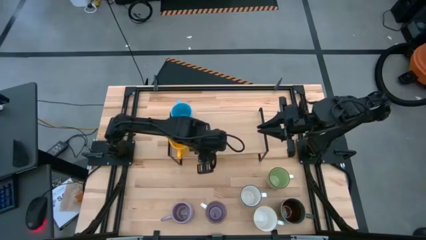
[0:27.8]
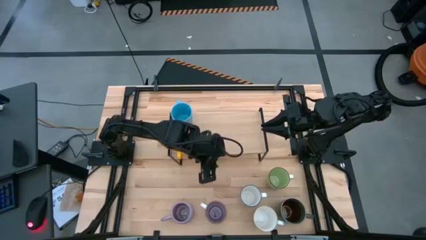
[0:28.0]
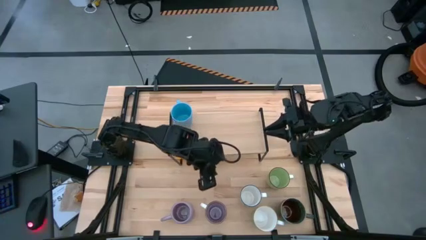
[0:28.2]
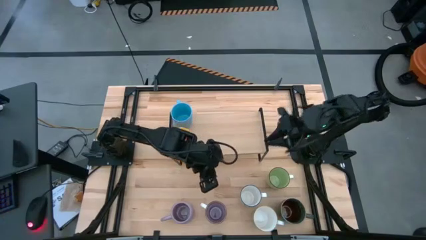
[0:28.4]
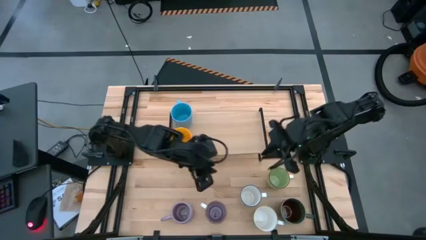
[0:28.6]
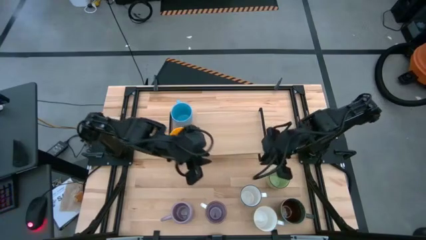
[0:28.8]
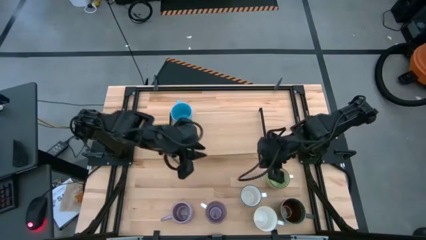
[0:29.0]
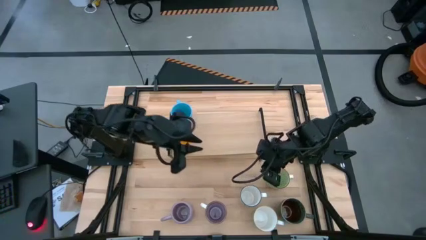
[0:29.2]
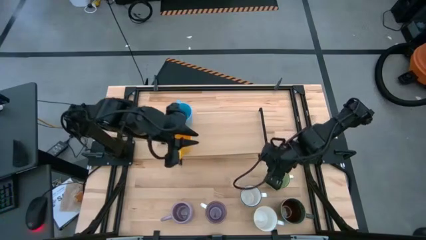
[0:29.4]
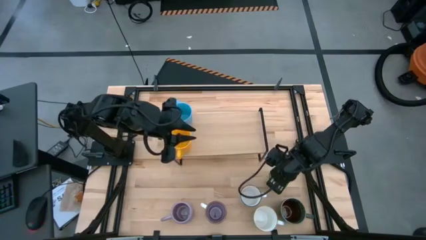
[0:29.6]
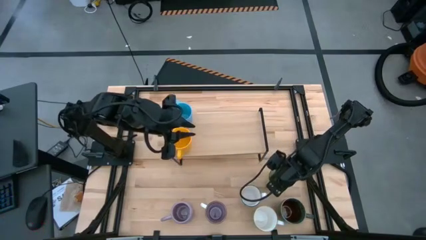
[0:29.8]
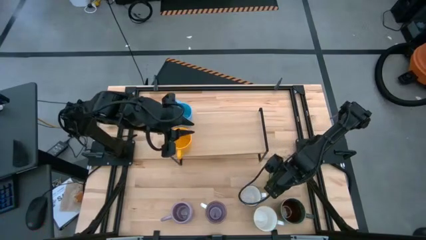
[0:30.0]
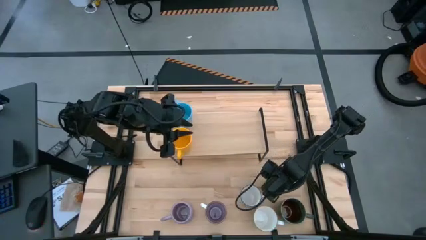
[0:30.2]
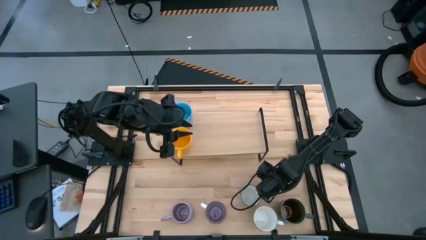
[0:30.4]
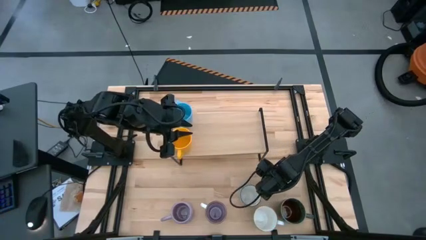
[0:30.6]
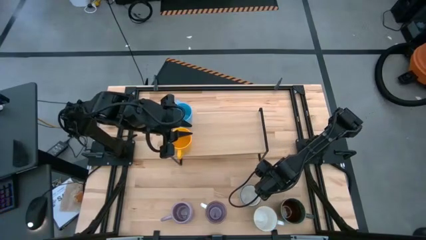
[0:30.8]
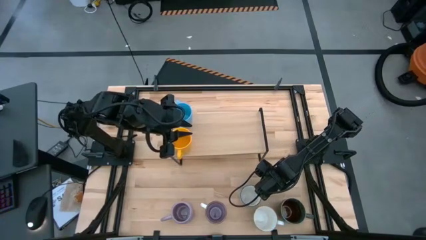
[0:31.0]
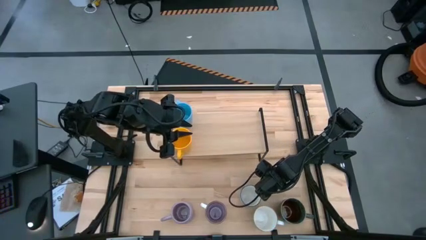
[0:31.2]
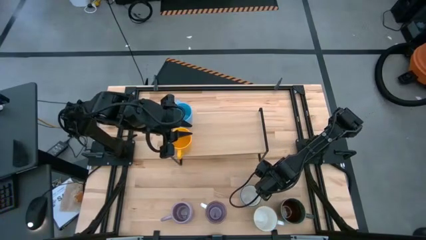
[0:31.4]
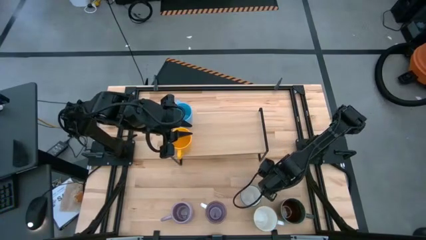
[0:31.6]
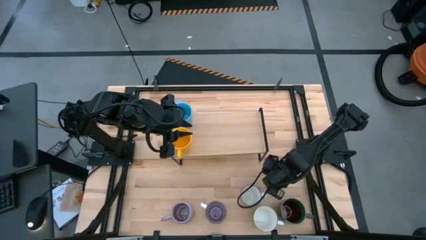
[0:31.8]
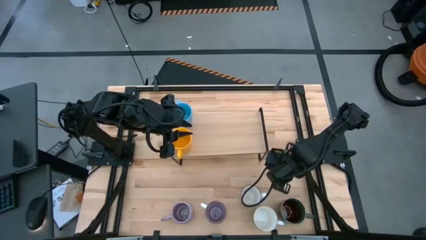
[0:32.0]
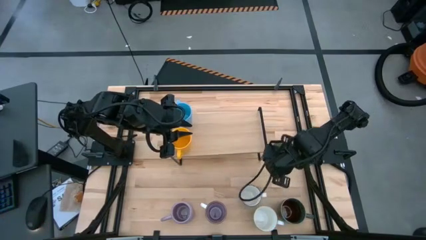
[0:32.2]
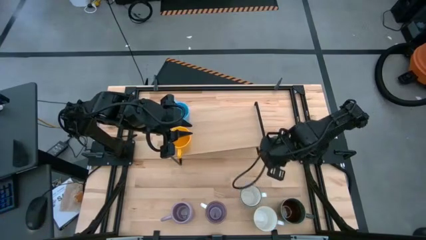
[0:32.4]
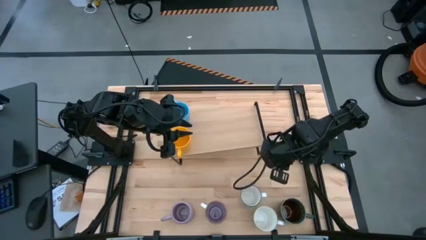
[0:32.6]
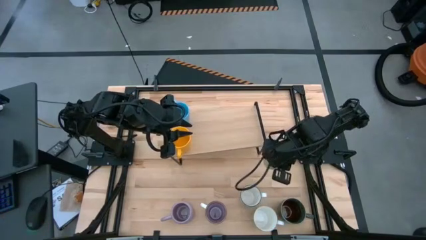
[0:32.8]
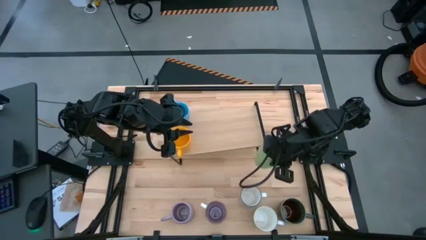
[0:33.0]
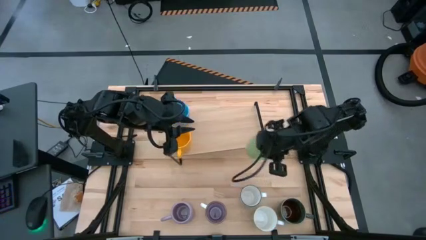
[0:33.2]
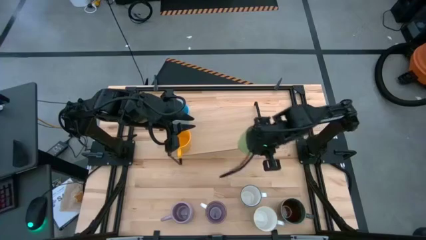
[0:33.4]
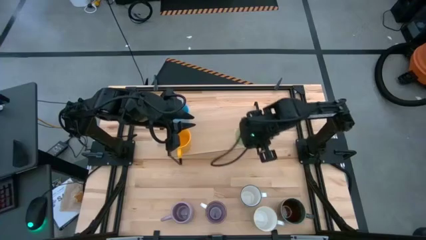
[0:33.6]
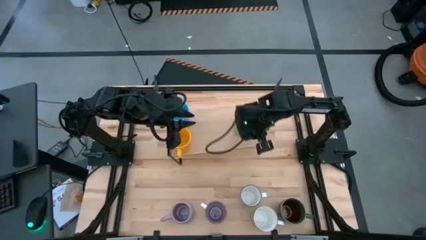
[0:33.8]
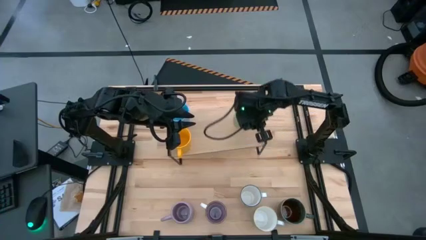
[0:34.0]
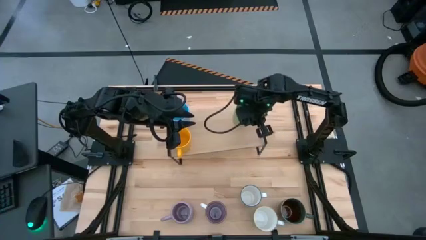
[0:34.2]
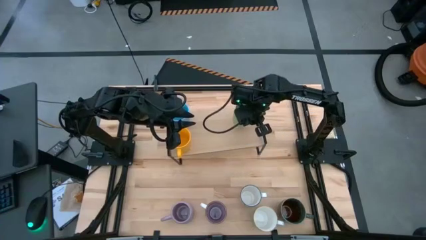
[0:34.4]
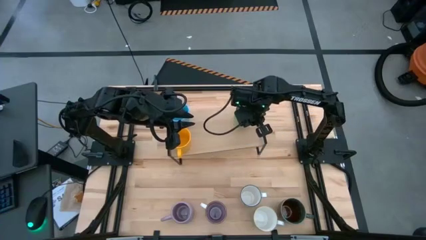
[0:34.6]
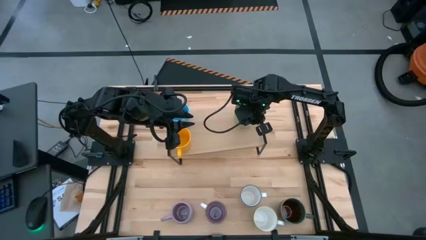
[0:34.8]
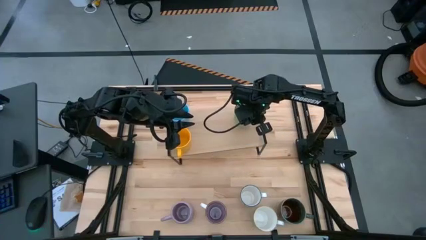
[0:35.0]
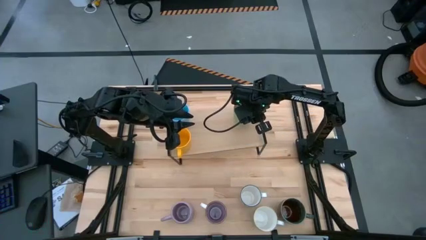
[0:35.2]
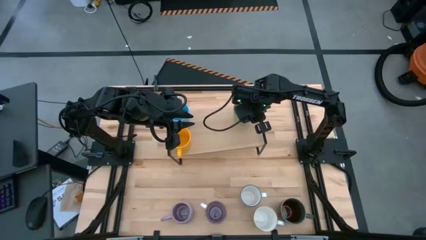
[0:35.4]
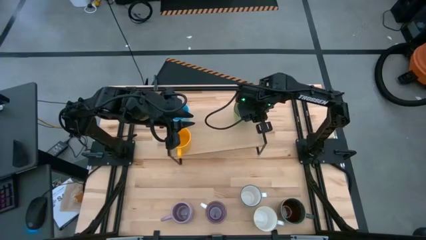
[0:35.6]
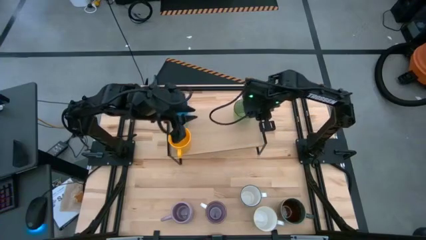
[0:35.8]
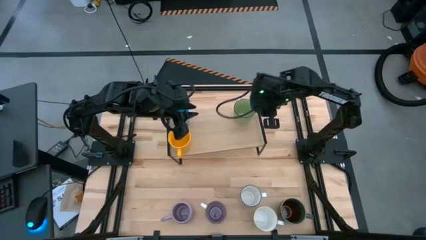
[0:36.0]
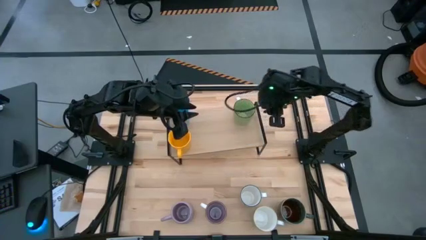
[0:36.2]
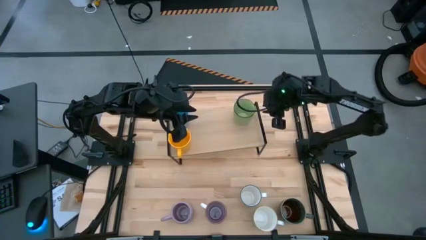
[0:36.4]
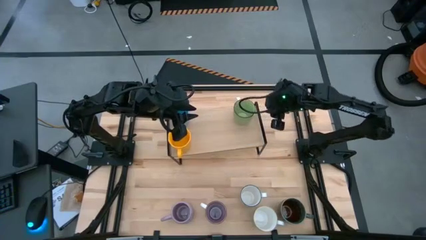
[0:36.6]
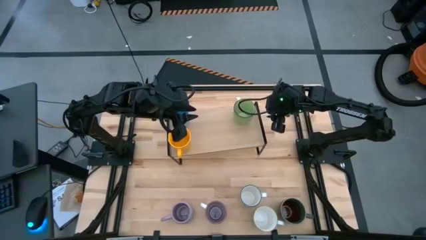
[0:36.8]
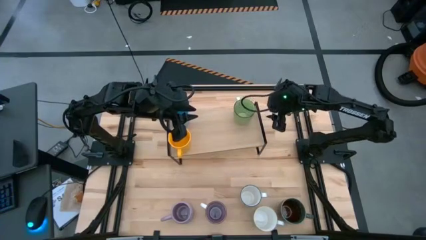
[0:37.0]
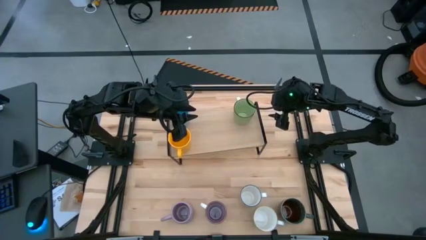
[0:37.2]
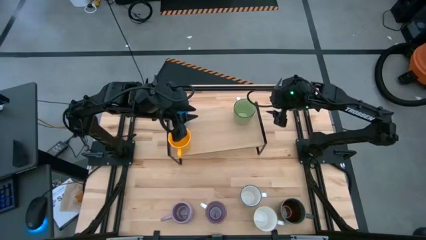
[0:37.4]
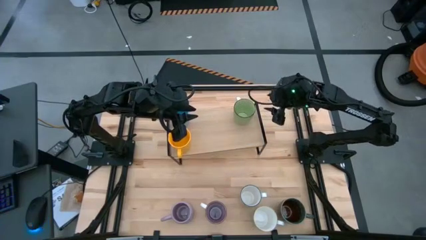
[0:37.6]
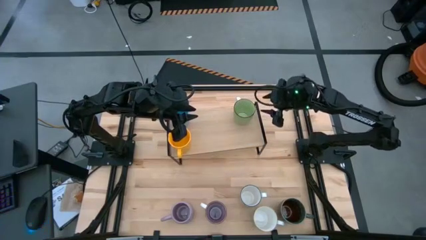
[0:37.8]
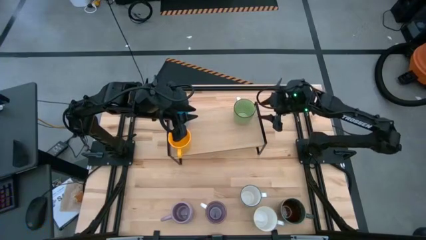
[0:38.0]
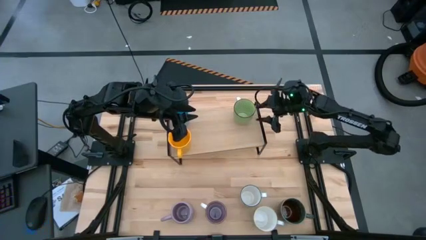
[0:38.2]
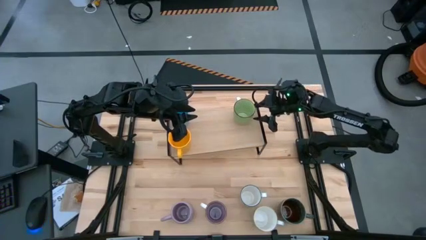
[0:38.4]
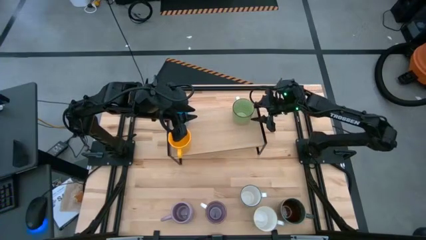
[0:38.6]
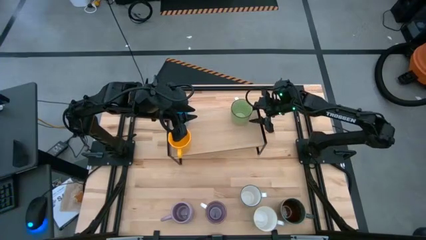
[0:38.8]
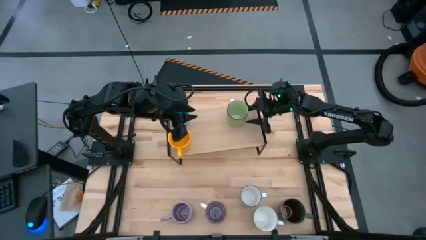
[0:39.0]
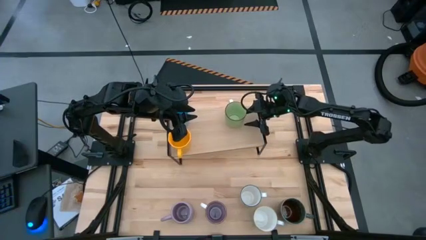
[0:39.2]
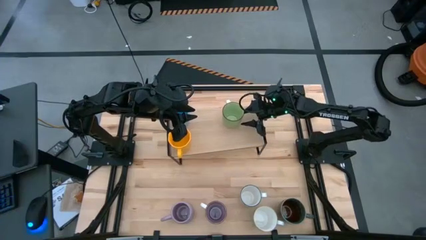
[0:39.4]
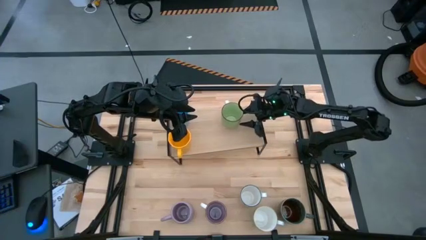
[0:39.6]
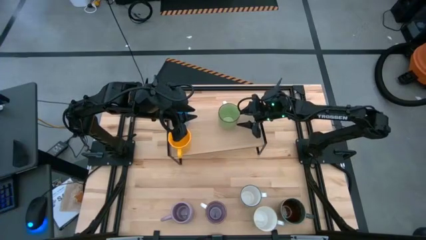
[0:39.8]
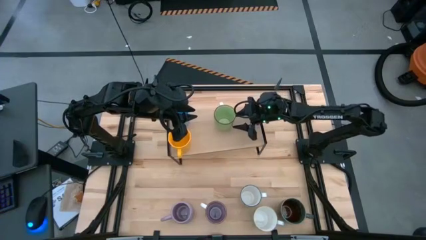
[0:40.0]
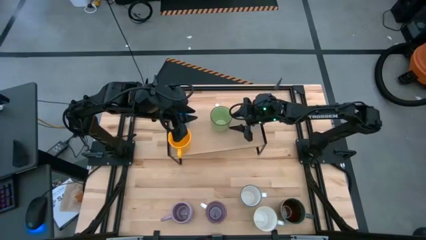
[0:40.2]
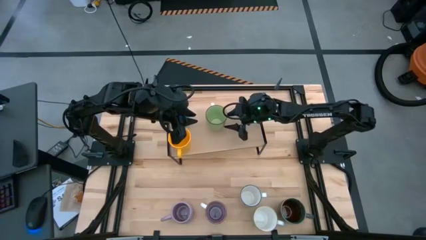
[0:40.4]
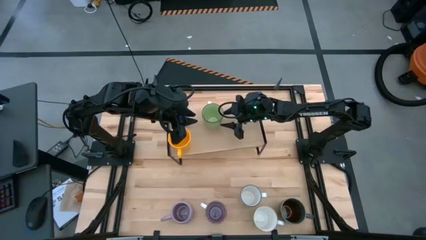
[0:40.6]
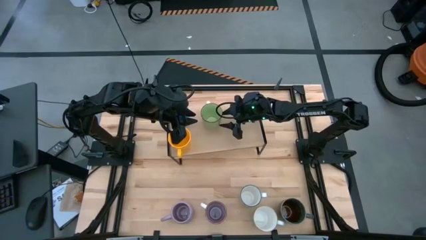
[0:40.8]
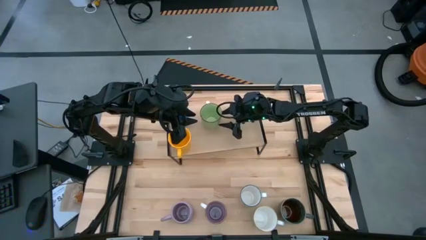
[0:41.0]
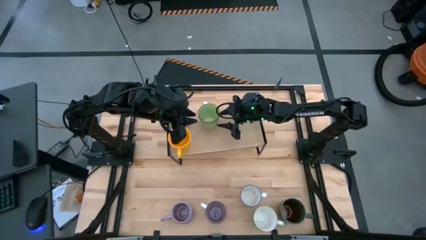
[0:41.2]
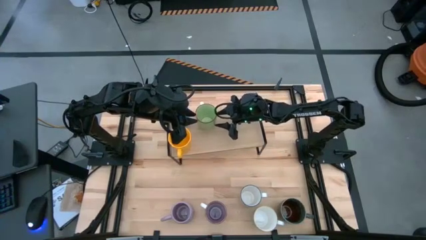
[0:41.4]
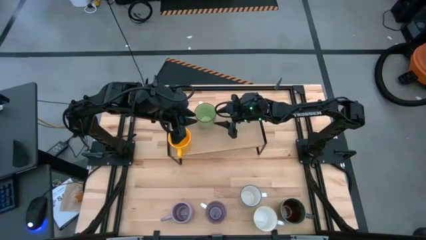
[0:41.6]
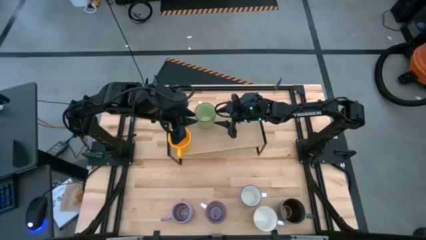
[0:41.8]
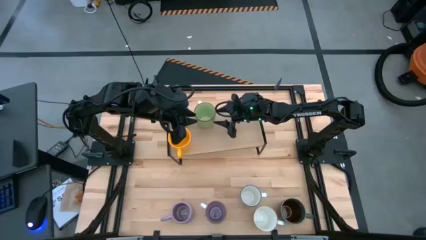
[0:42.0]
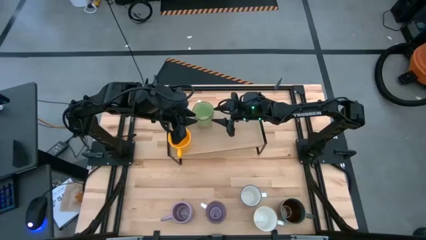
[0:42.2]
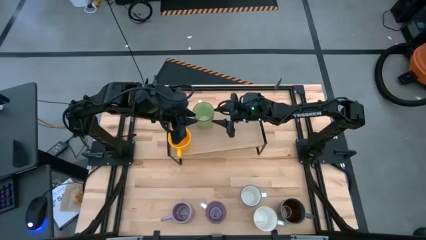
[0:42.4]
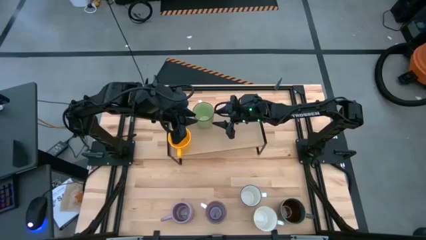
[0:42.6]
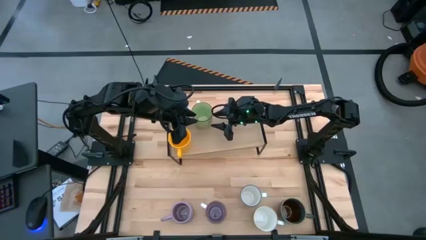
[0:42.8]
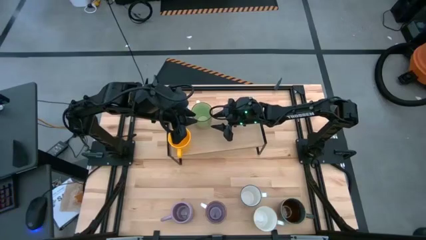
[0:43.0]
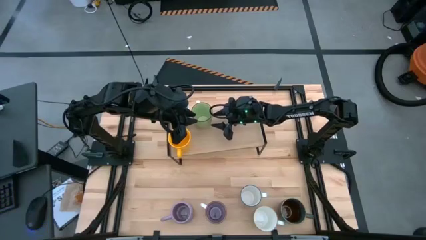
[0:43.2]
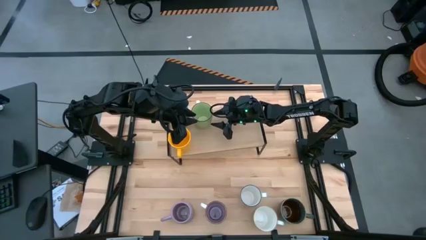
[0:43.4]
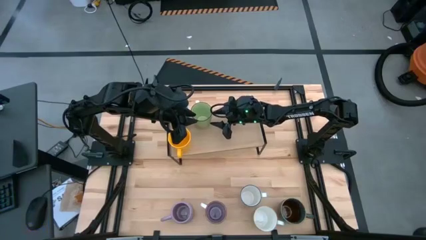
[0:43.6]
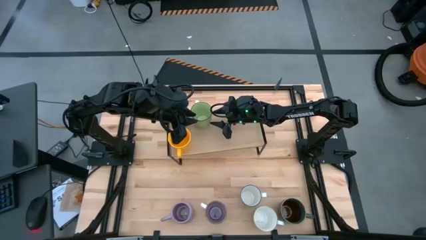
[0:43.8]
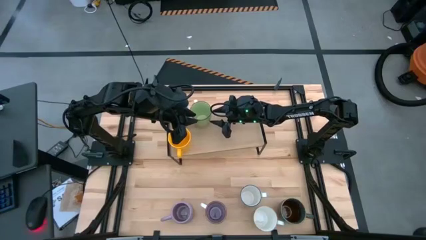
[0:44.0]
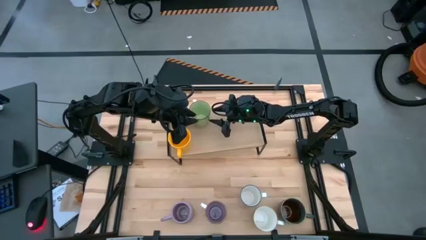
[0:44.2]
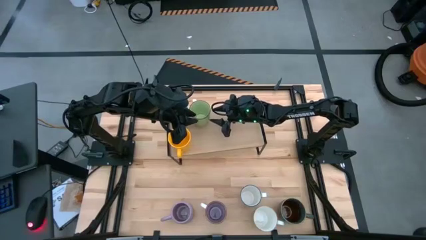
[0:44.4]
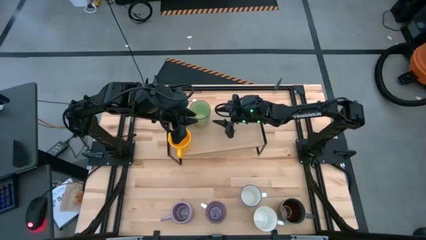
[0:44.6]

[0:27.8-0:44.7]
Task: Place coffee mugs
Put the green mug on the shelf
